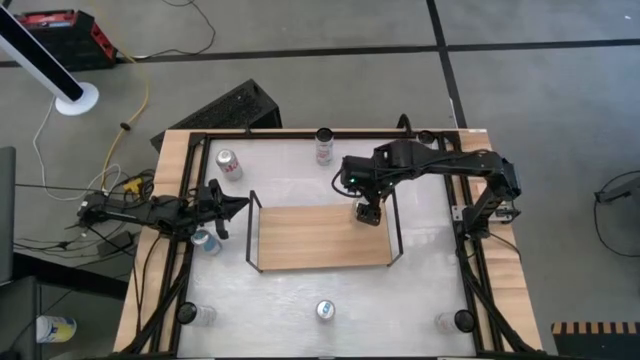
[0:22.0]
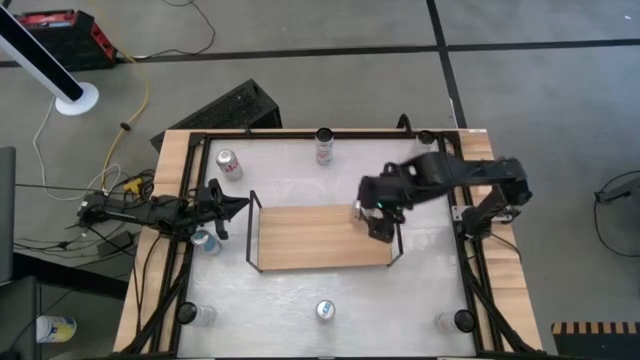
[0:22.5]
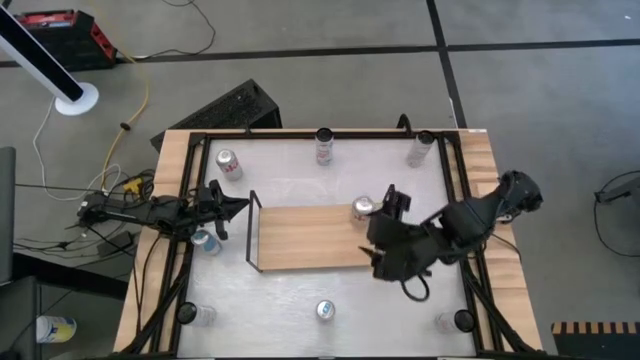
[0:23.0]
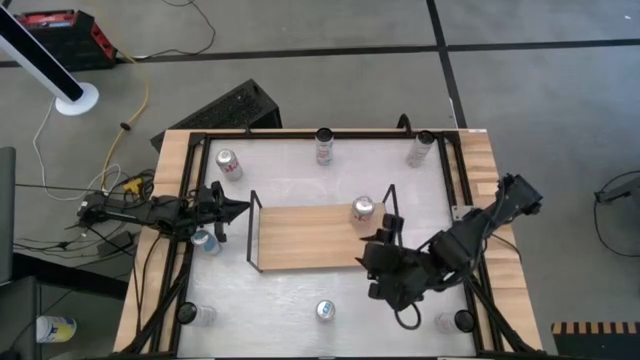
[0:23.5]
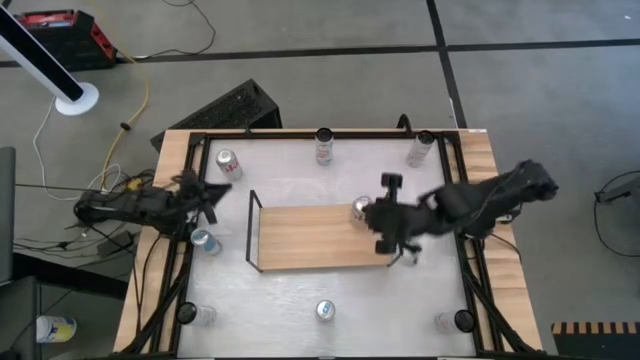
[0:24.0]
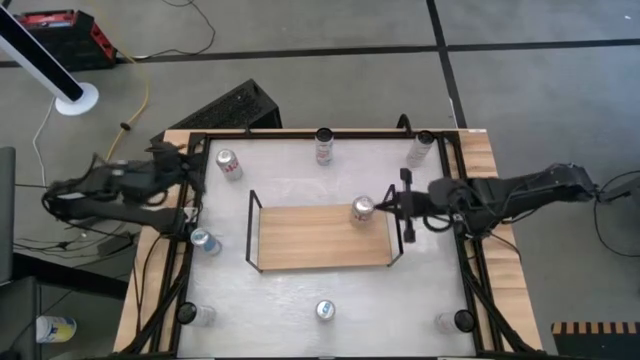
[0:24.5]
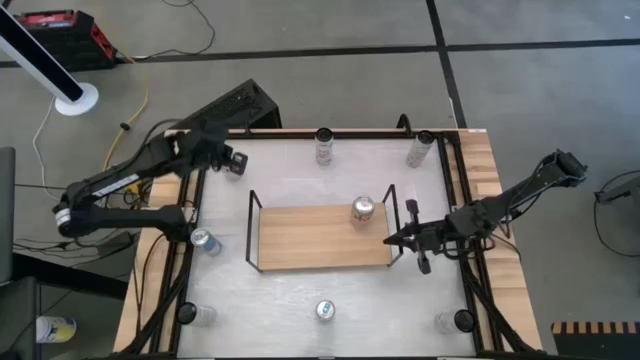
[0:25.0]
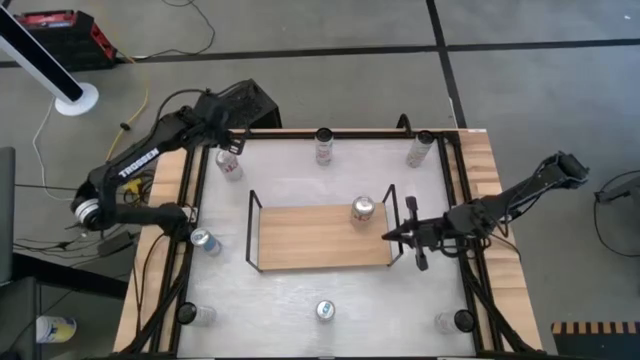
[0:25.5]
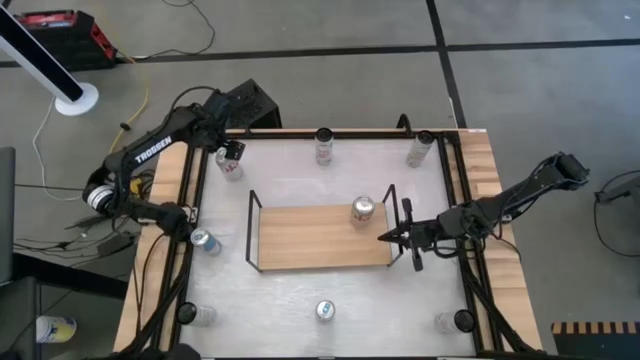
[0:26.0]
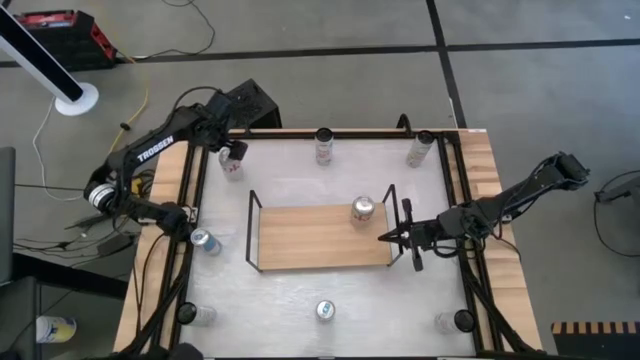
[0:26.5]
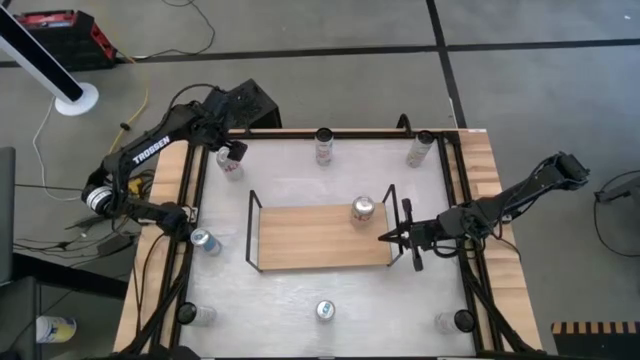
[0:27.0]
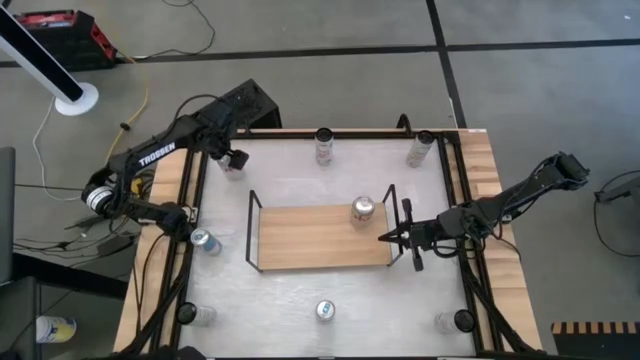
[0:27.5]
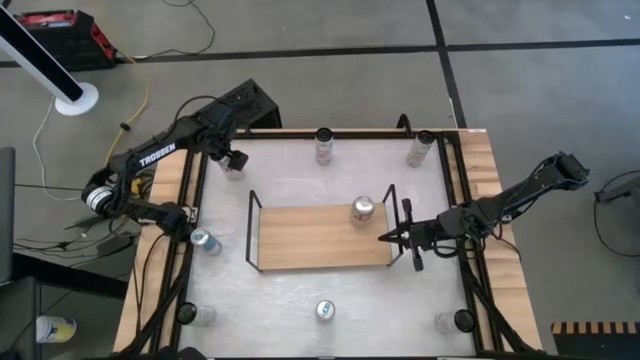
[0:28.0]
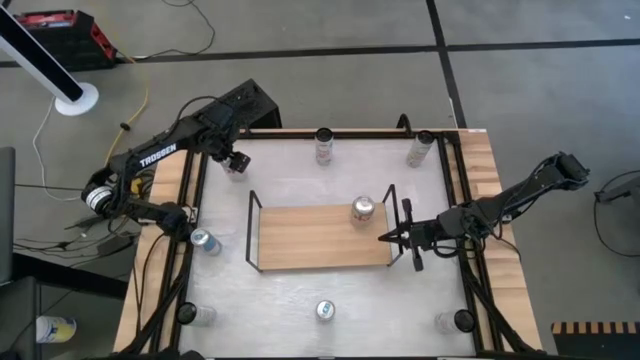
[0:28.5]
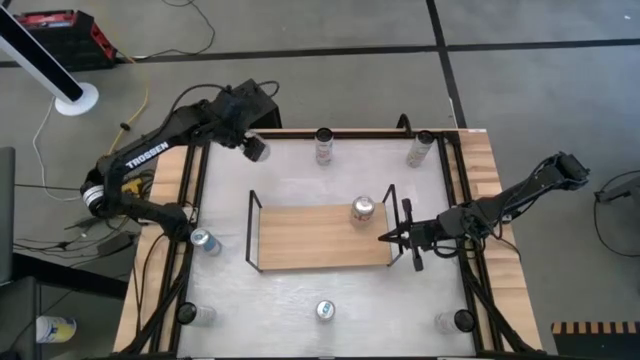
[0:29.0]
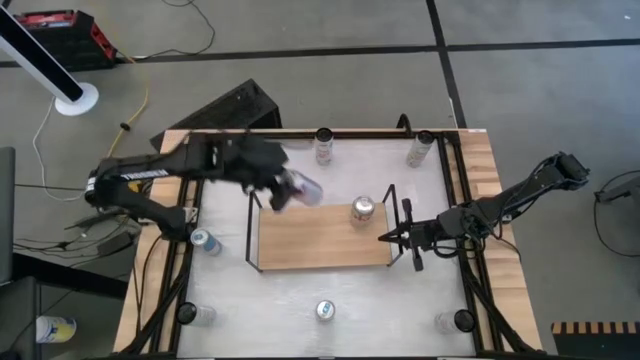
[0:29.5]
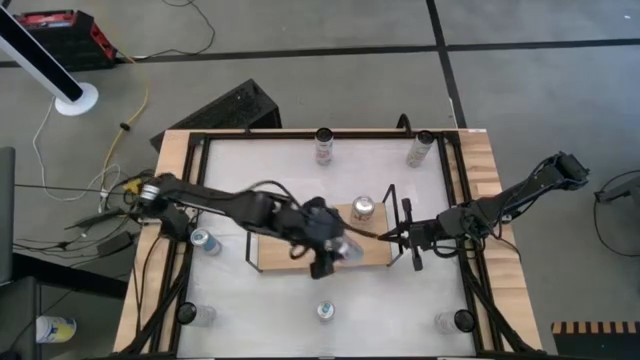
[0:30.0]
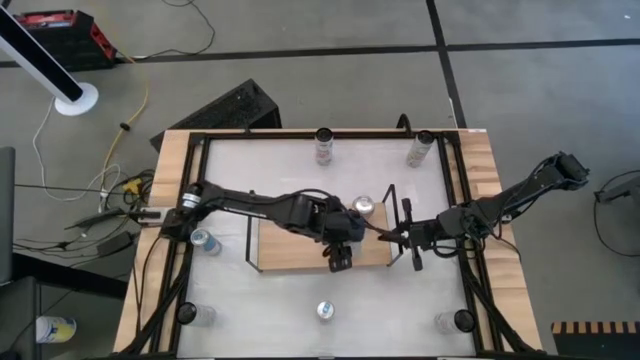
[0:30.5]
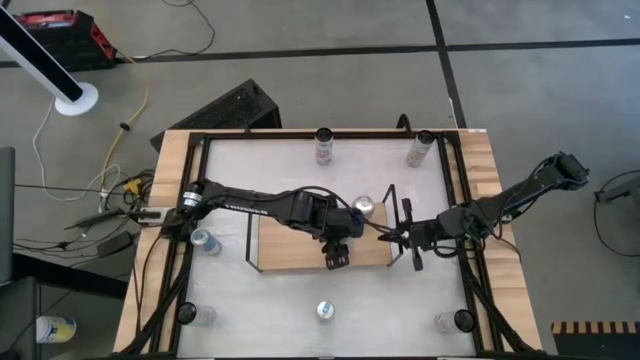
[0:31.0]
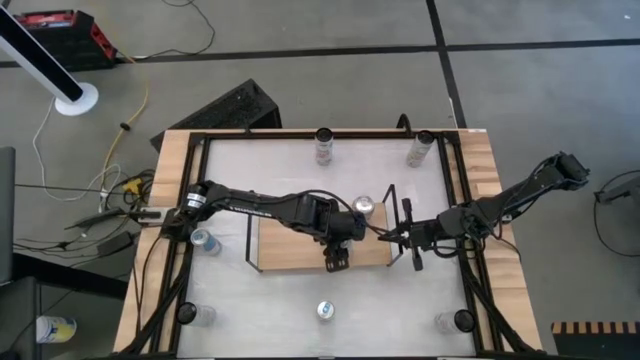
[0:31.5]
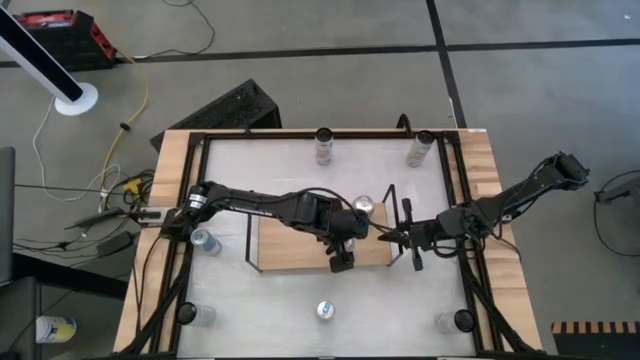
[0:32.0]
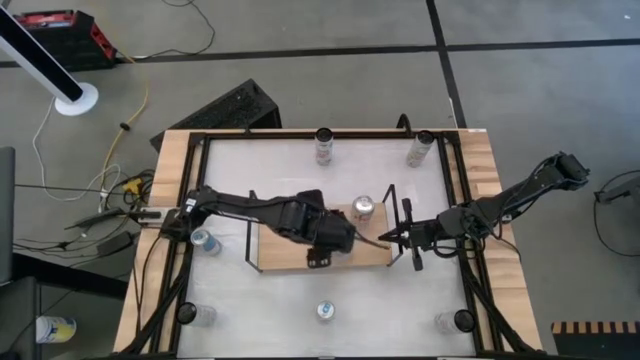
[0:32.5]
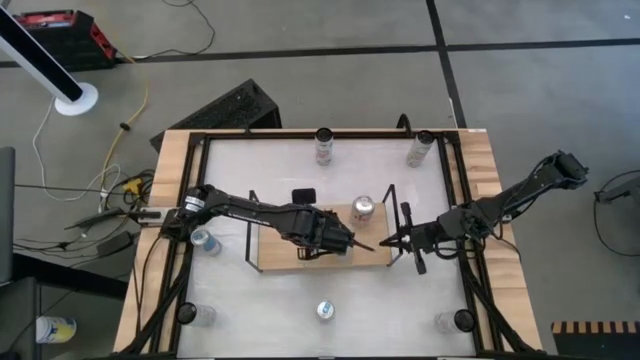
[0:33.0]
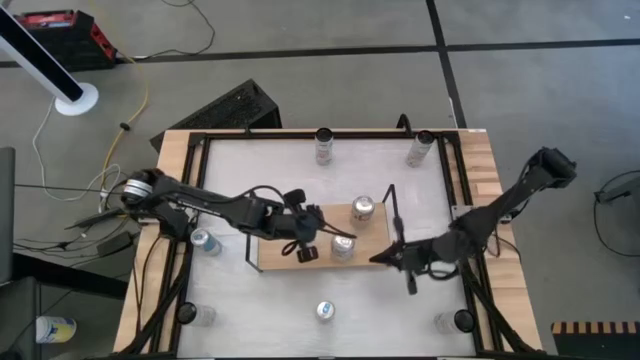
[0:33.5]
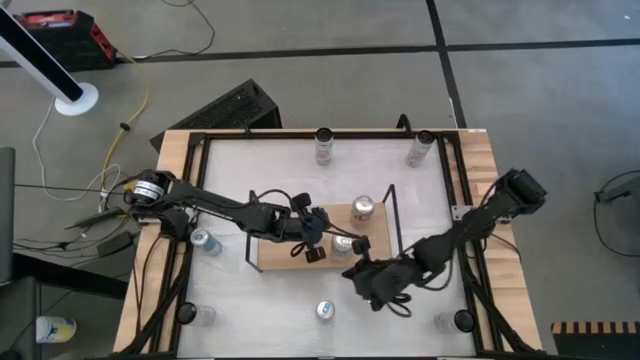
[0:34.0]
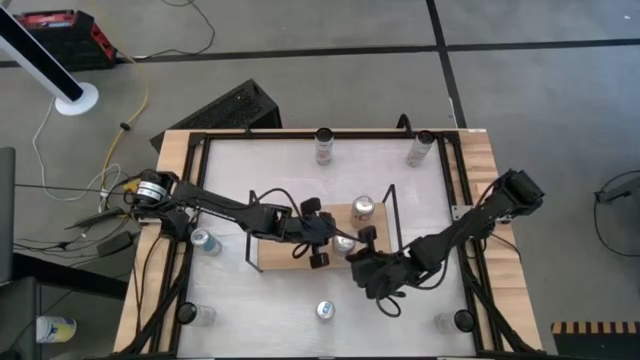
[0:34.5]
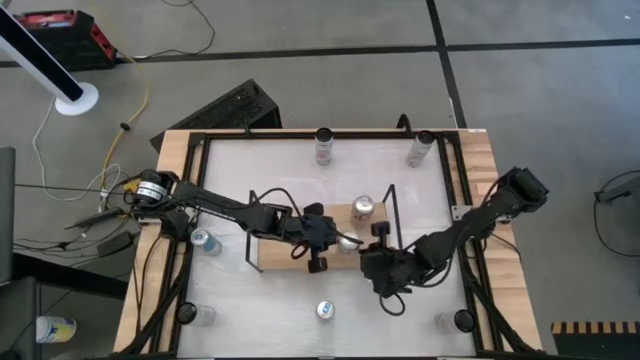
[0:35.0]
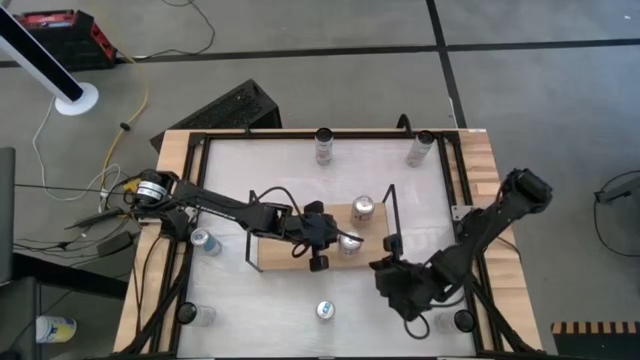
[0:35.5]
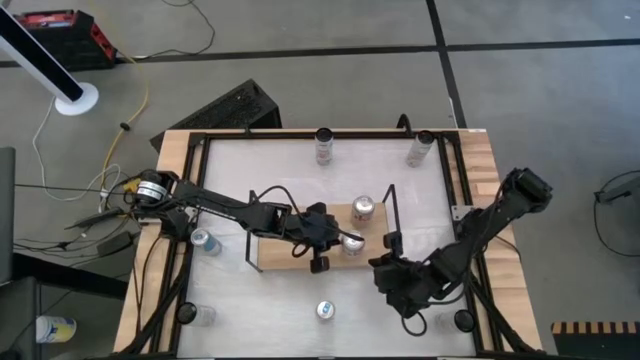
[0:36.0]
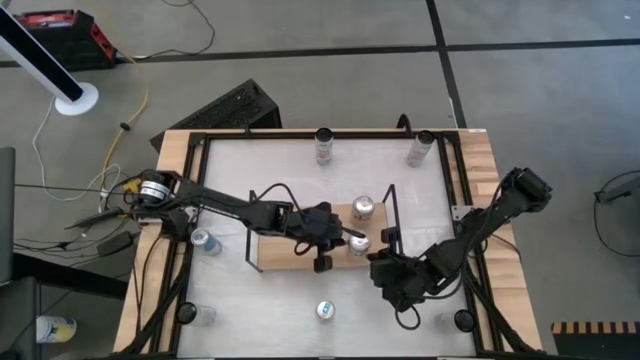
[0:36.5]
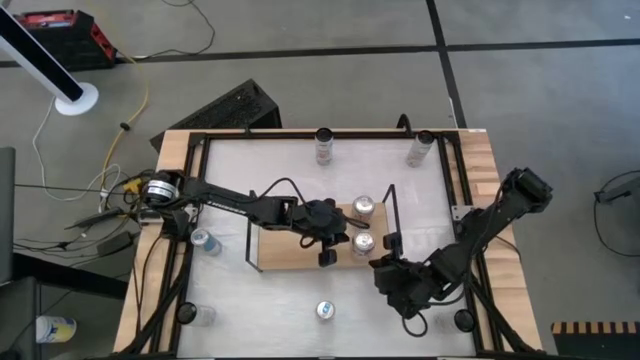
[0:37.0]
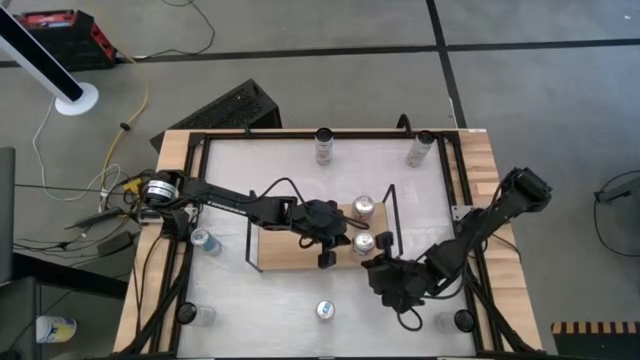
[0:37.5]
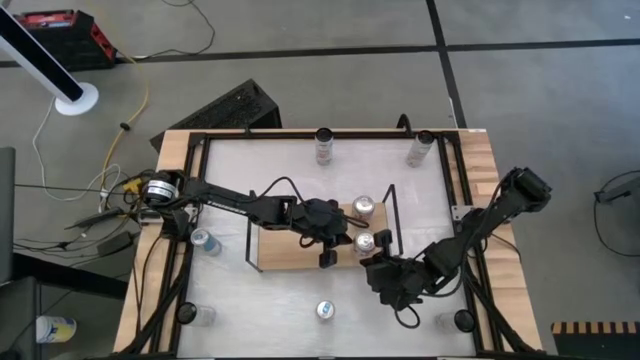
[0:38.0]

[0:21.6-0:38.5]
Task: Place canned beverage on shelf
Put the red silver soda can on the shelf aligned with the other red silver soda can

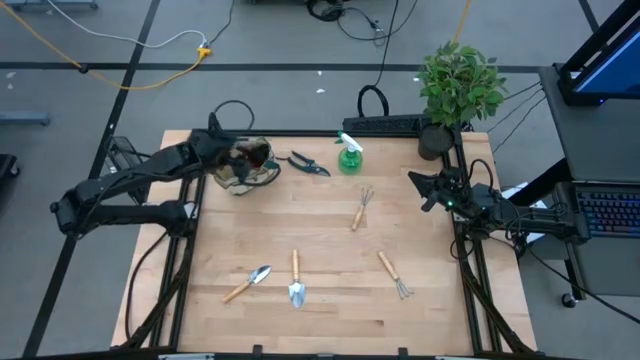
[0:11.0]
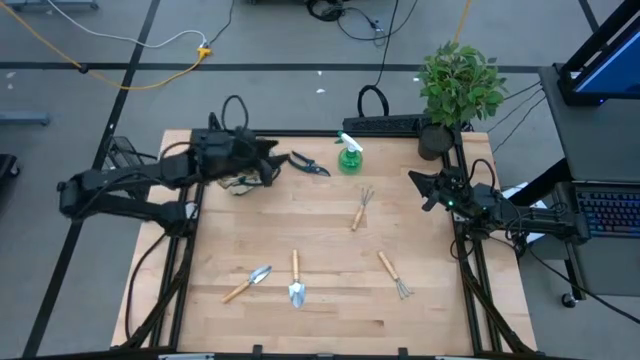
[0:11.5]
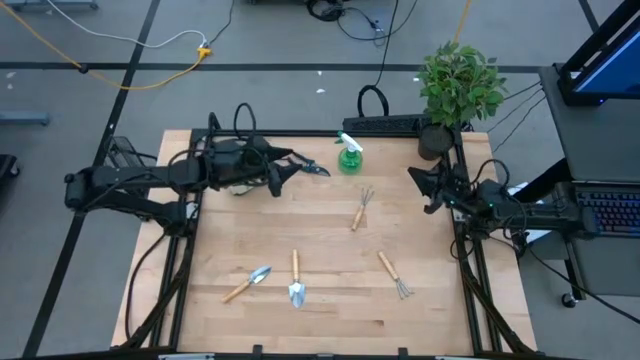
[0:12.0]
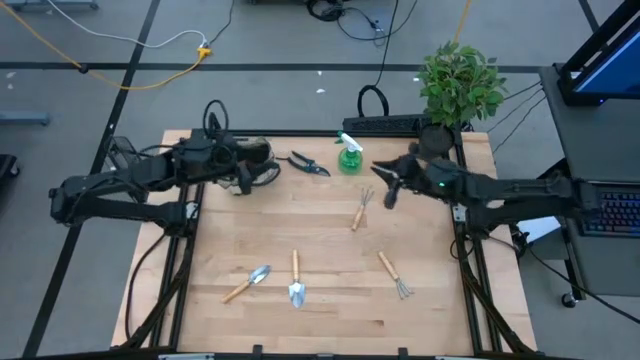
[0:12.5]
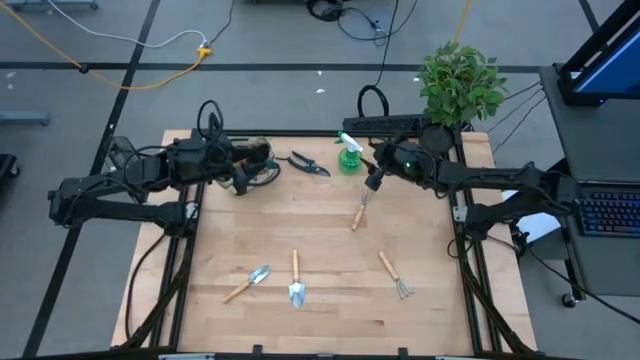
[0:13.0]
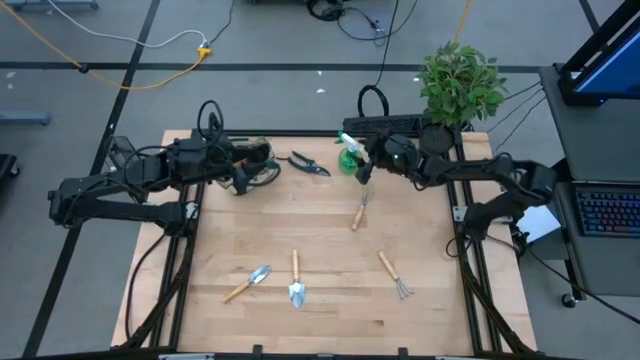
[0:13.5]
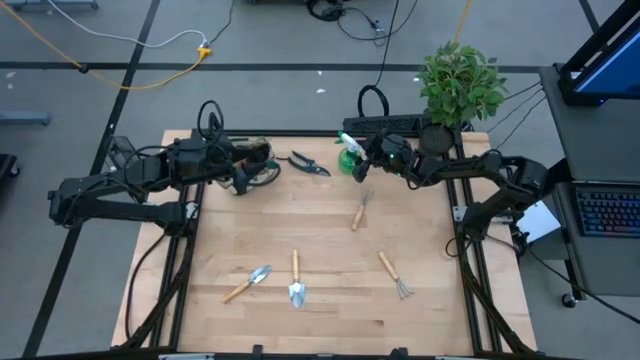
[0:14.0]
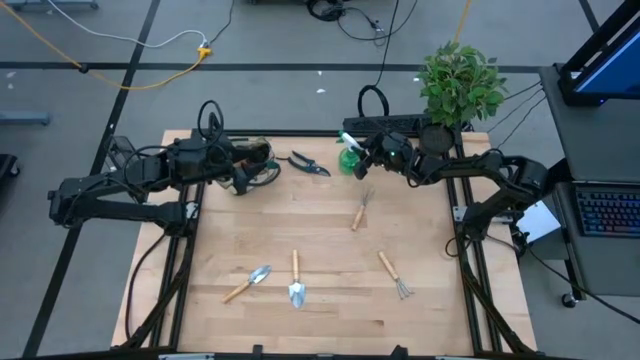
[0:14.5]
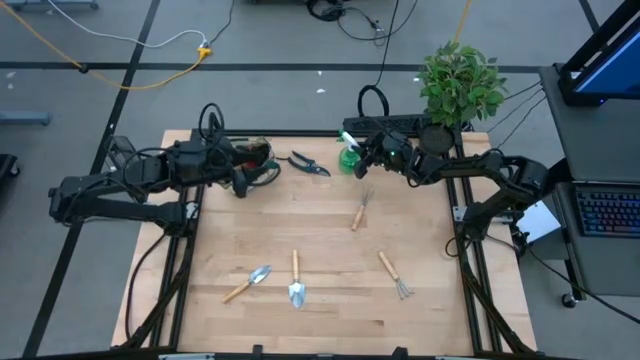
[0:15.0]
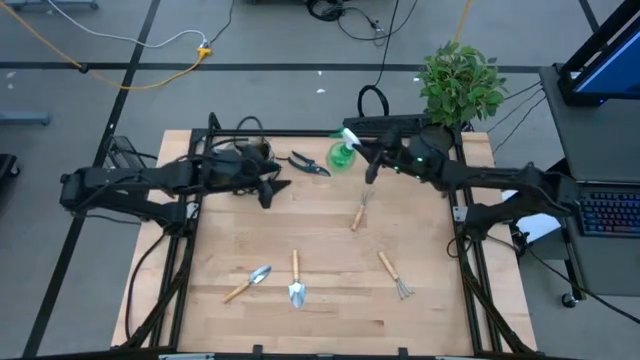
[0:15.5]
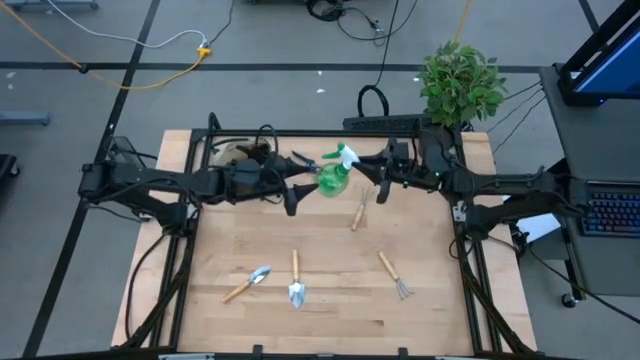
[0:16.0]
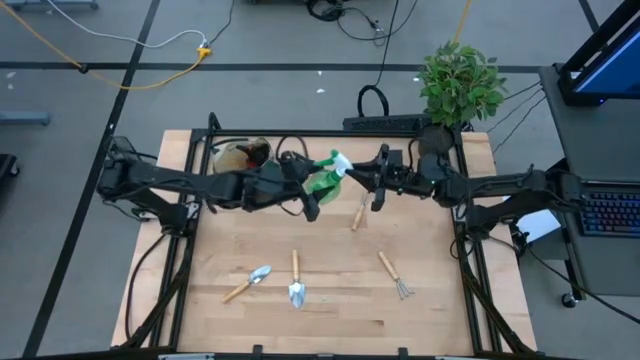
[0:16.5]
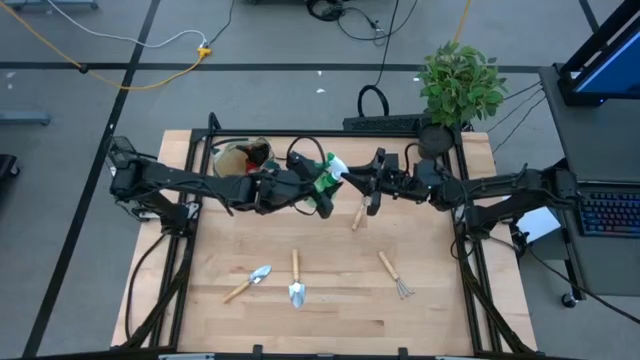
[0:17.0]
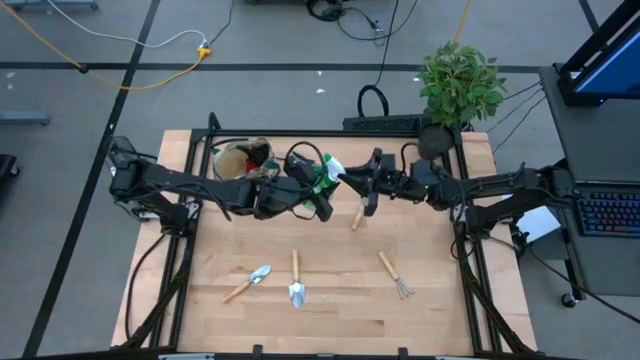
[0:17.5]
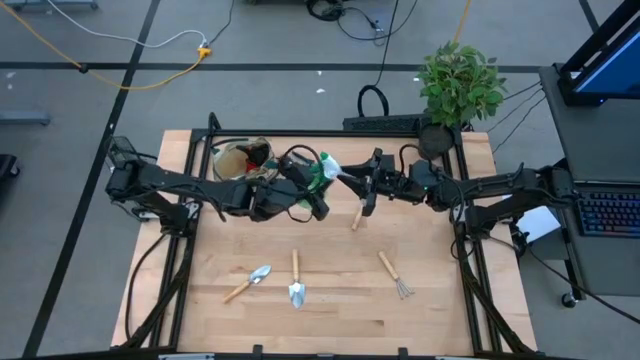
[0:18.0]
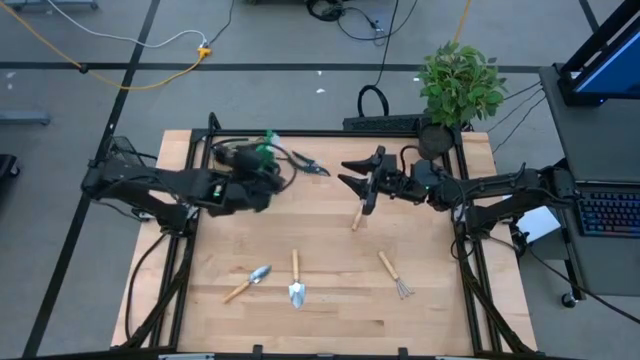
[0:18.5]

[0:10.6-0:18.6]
Task: Pick & Place Garden tools in Gardening bag
Put the green spray bottle into the gardening bag
